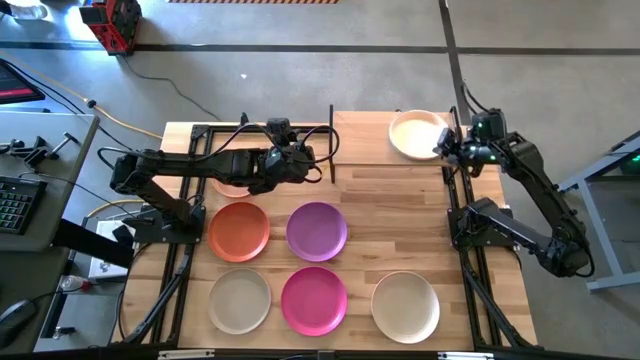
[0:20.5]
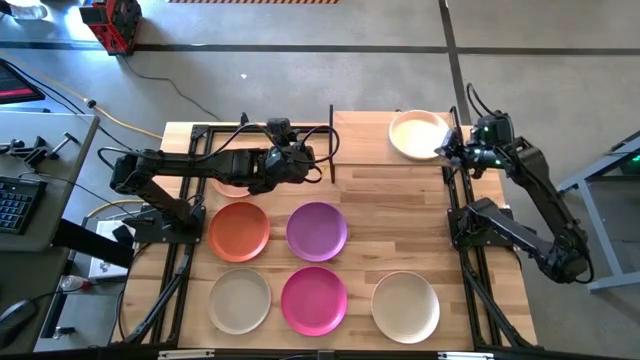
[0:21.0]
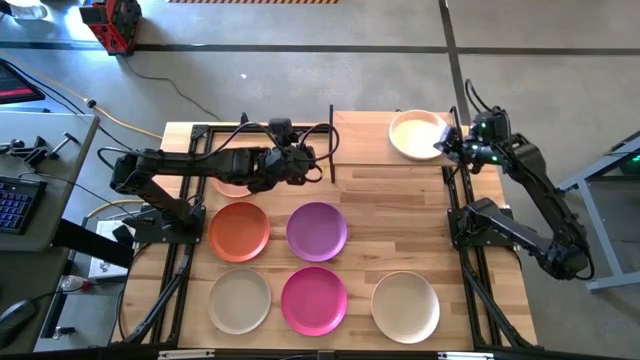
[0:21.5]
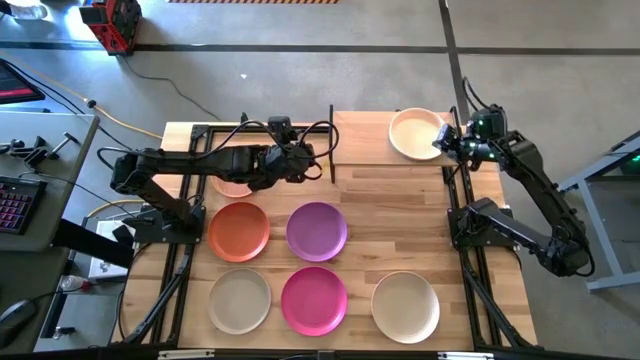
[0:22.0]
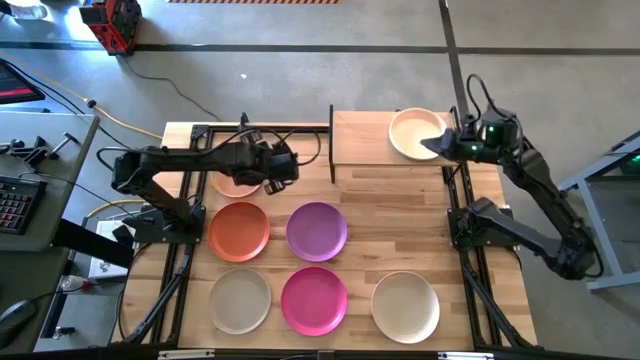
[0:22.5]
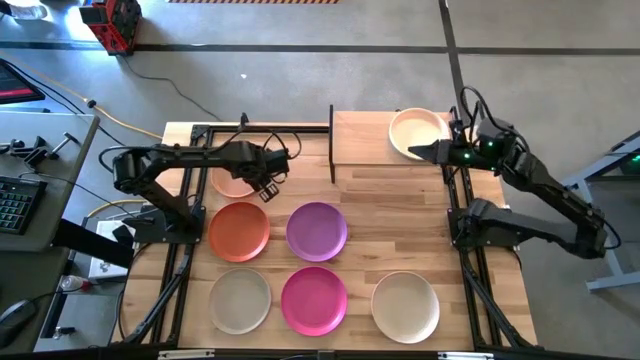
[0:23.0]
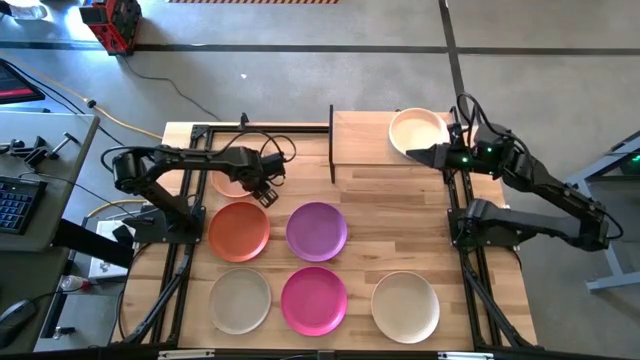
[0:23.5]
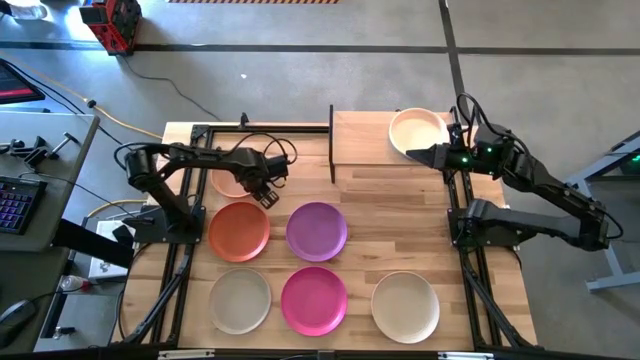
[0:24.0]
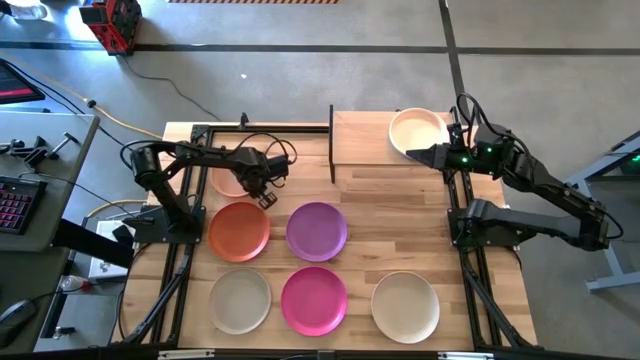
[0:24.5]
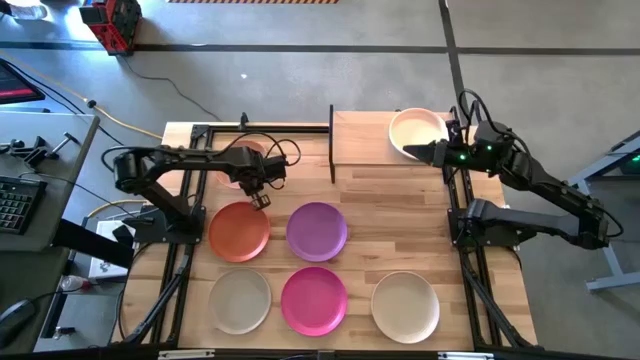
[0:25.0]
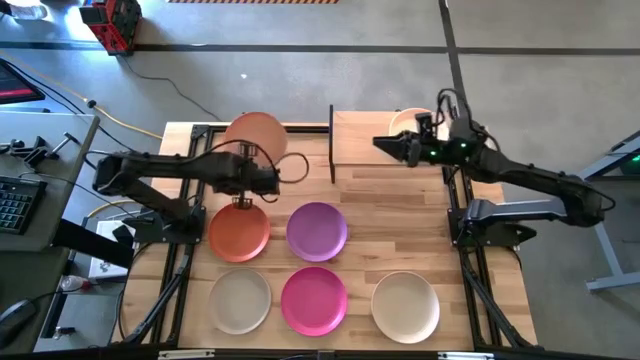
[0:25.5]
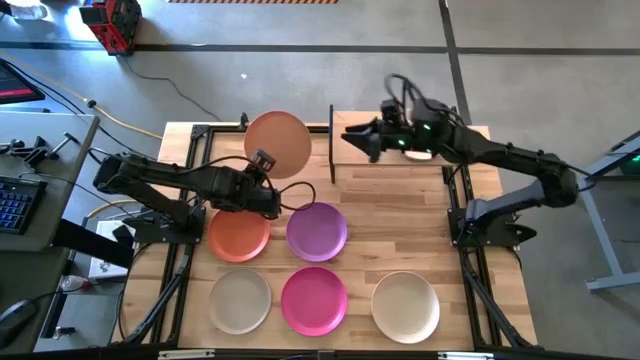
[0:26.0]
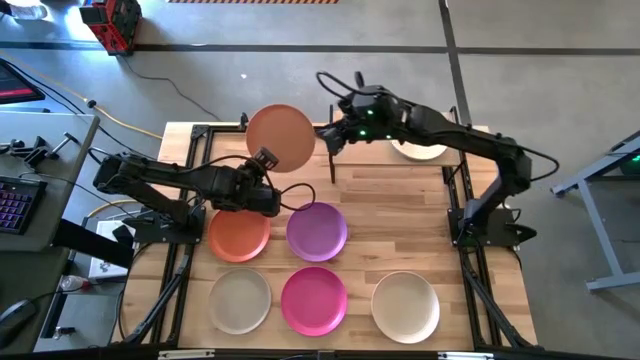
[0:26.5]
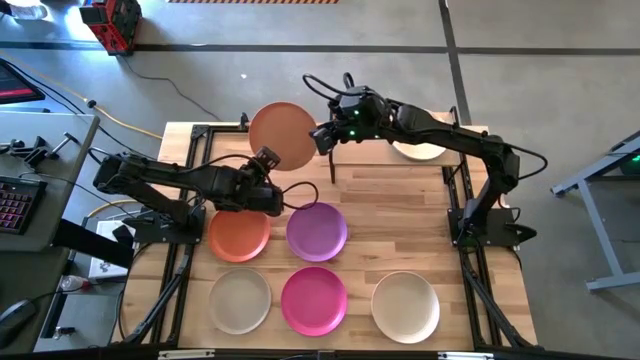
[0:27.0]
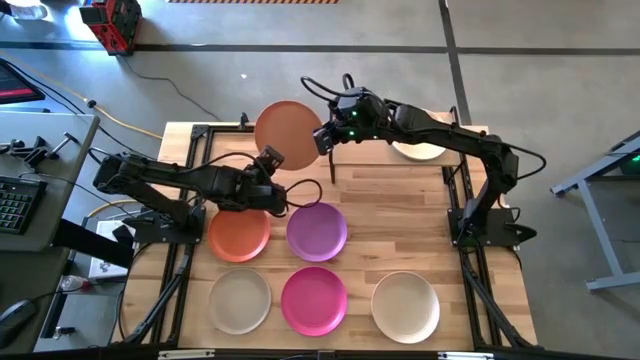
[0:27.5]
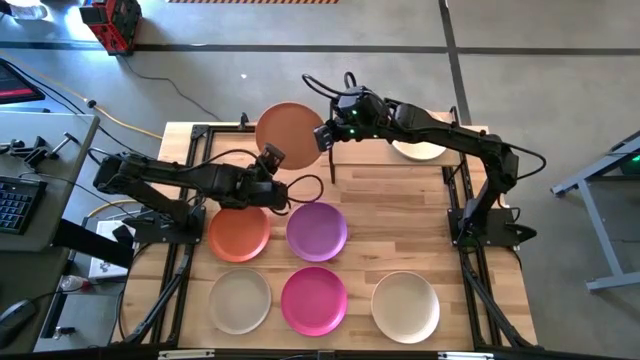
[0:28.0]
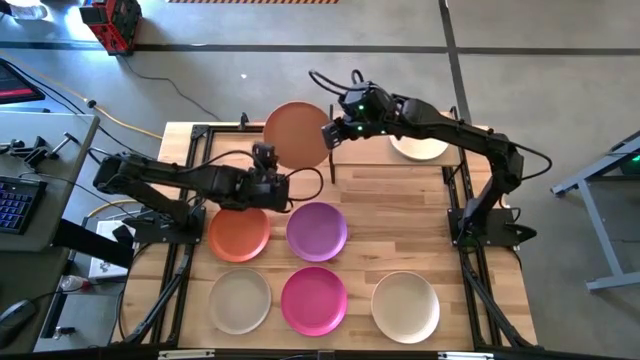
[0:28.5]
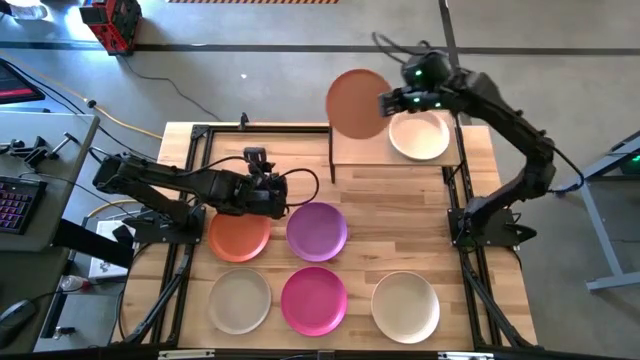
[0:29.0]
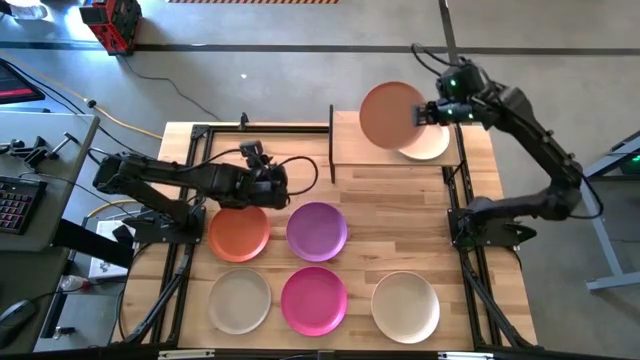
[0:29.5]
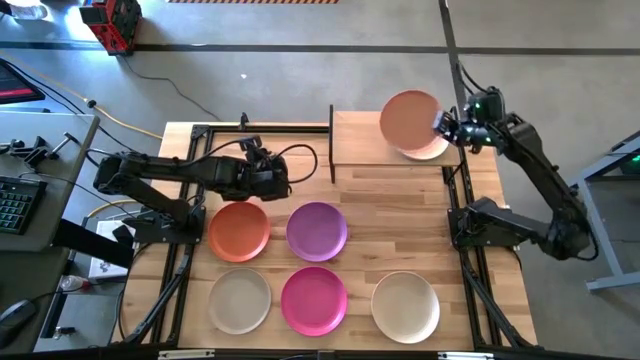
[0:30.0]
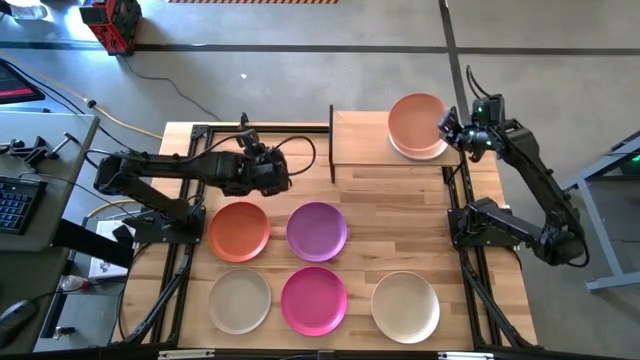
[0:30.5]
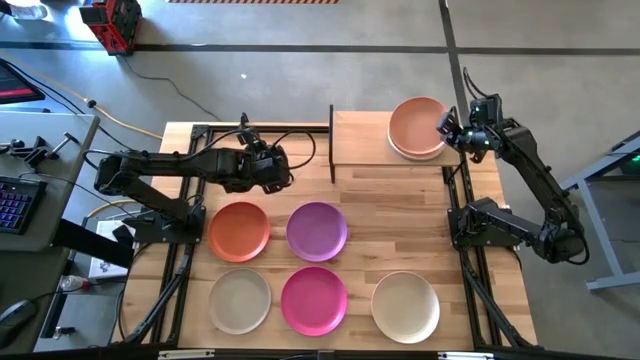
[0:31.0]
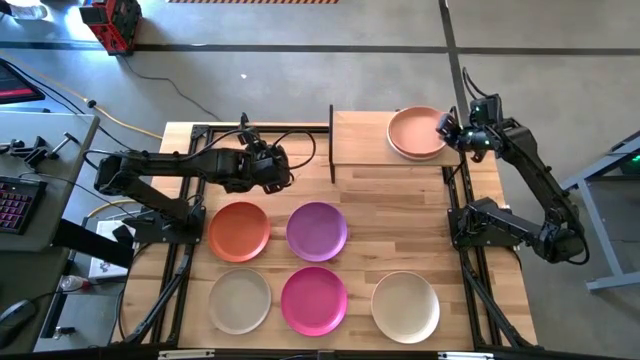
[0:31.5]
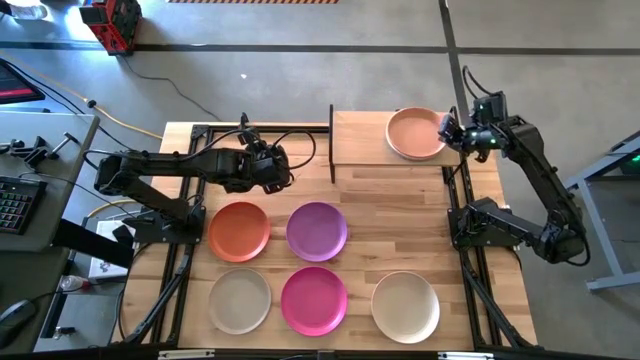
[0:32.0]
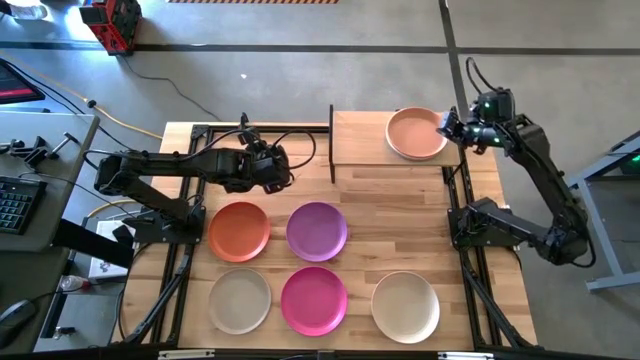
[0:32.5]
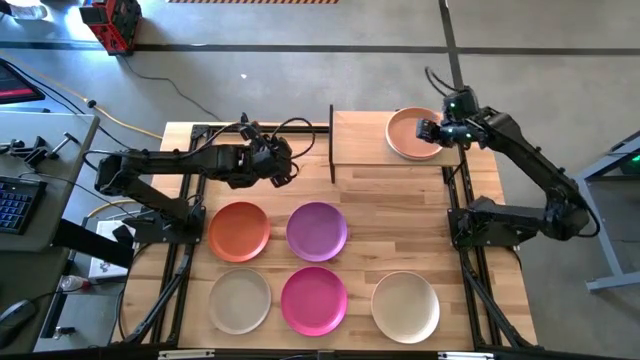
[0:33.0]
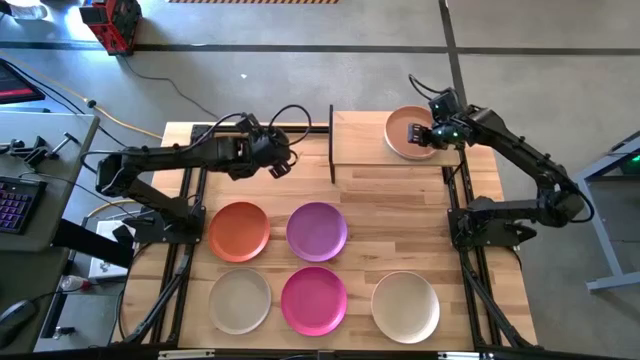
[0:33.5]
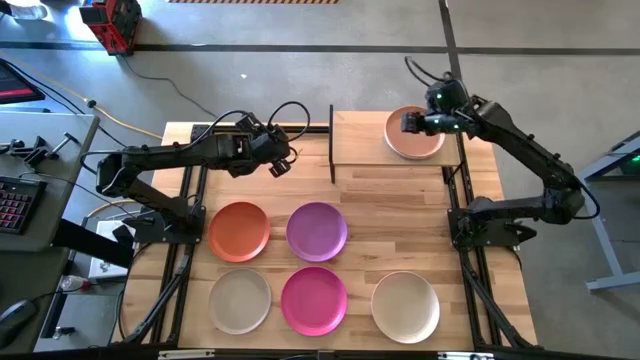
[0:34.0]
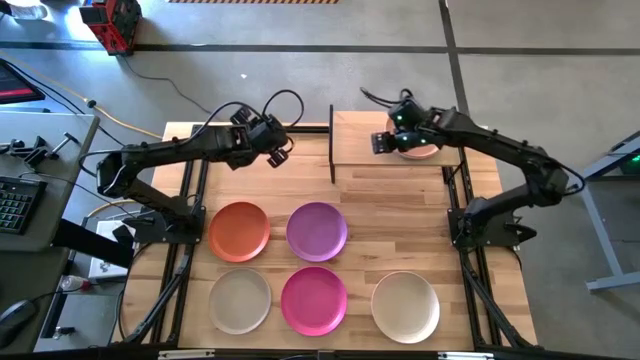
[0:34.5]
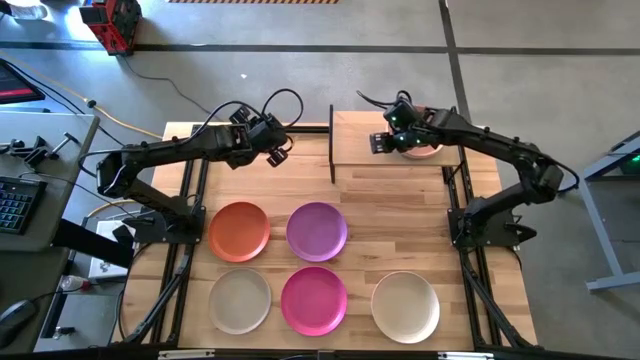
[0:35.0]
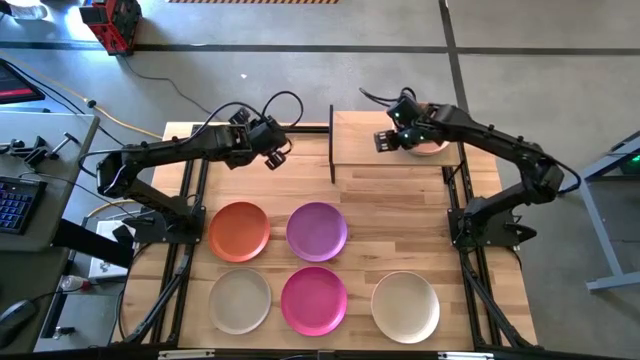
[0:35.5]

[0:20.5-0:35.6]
Task: Place and stack plates onto a shelf
Stack the brown plate on top of the light orange plate on the shelf

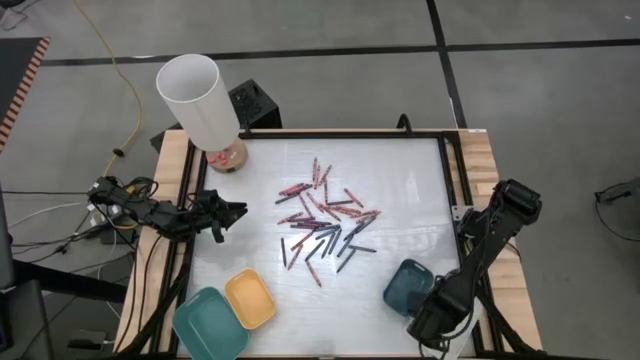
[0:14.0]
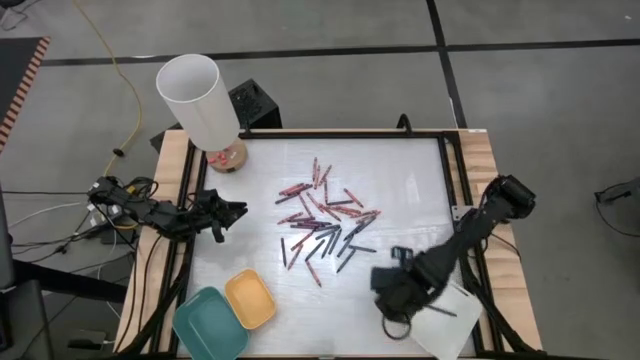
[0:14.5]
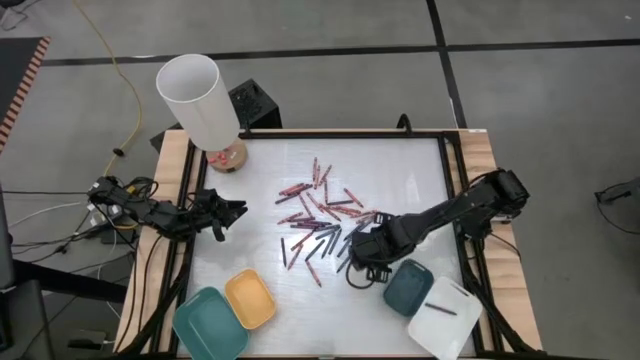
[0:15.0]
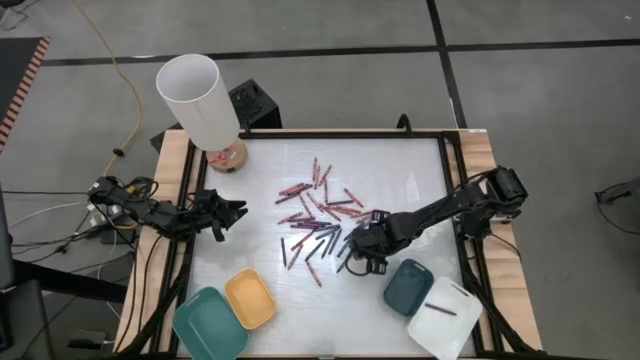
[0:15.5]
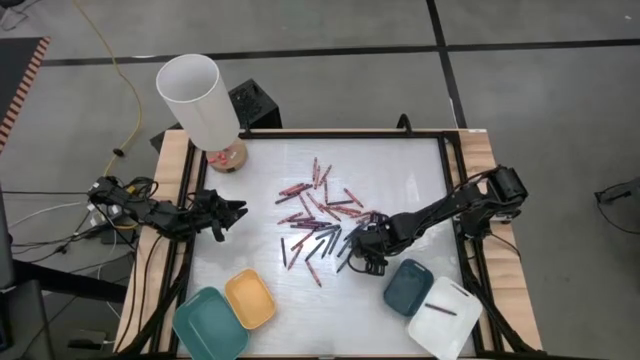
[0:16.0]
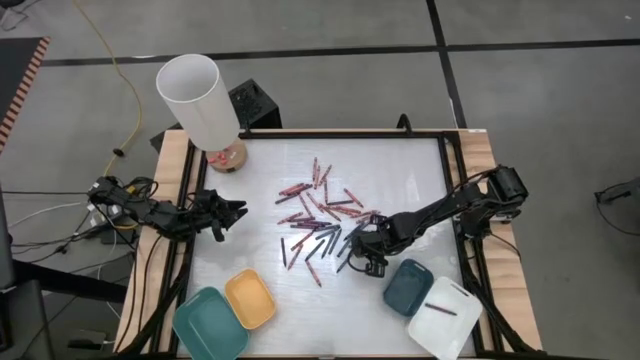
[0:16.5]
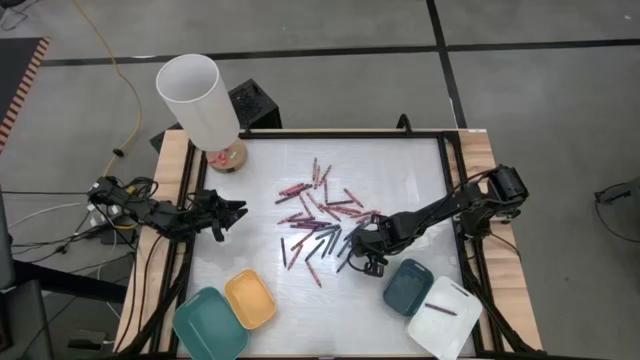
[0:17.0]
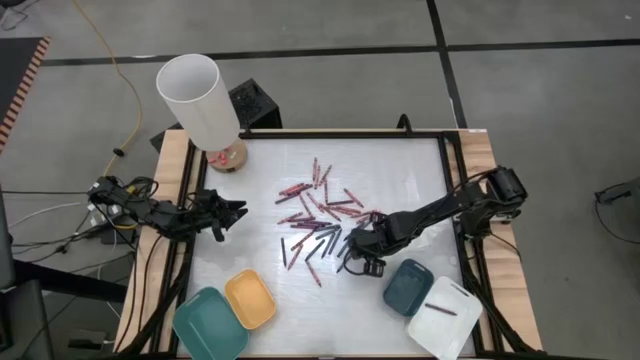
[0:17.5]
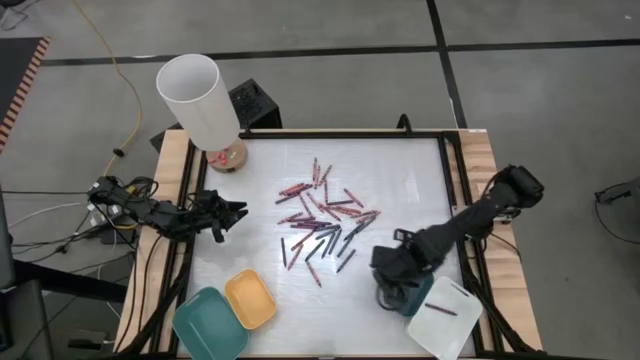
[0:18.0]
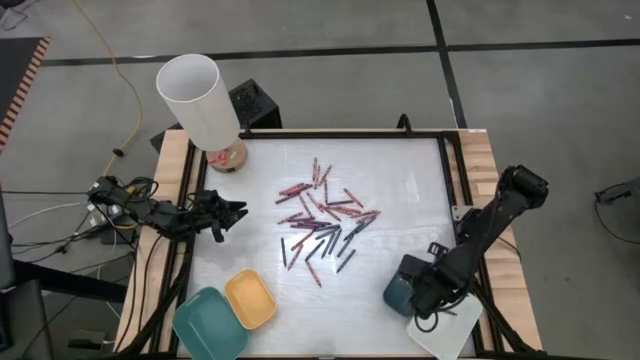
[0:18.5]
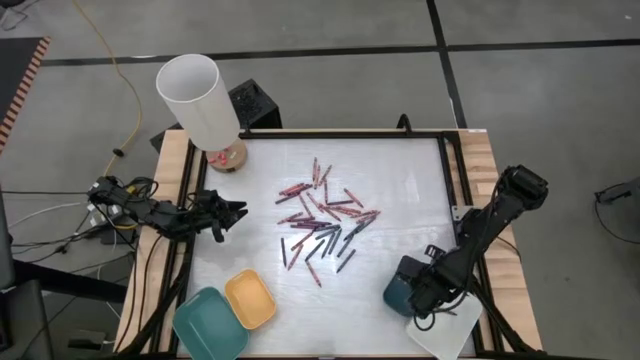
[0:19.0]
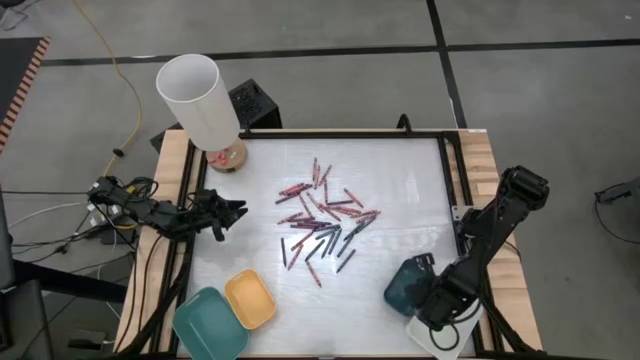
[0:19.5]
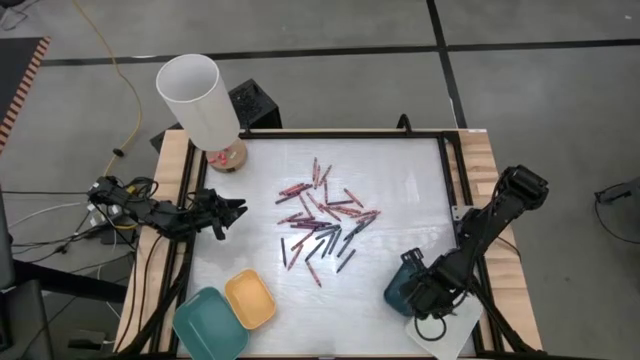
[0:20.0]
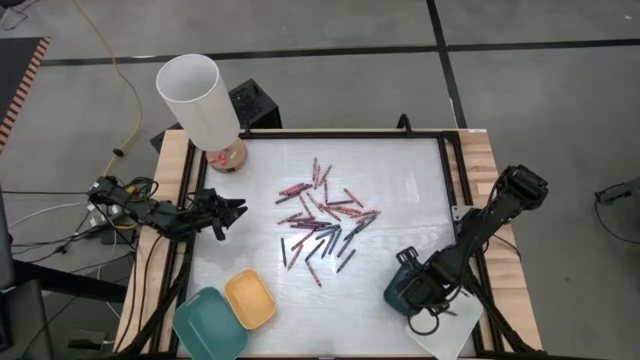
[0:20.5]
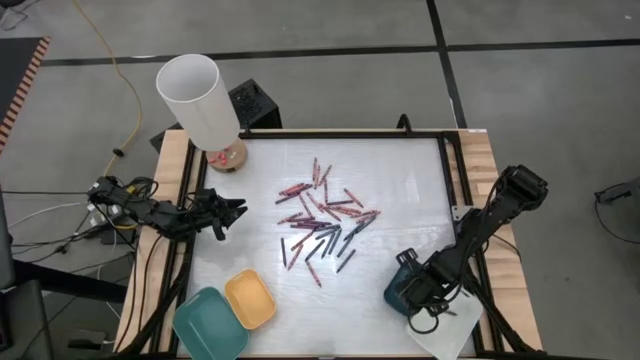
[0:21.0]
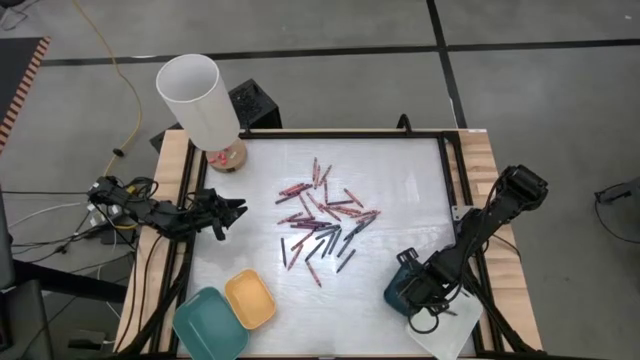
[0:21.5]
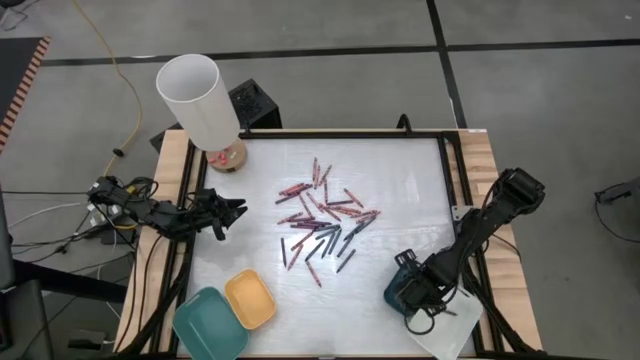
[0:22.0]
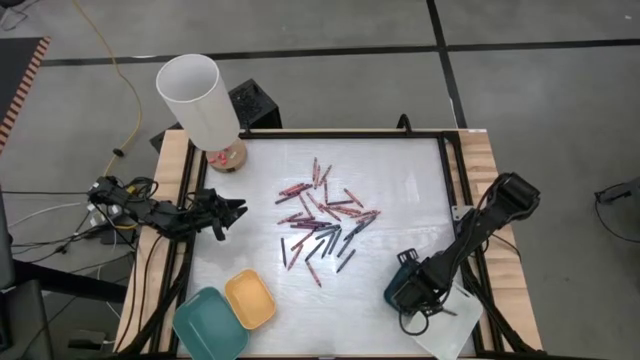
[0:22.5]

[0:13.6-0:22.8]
Task: Sort crayons
Put the blue crayon into the dark blue bin
